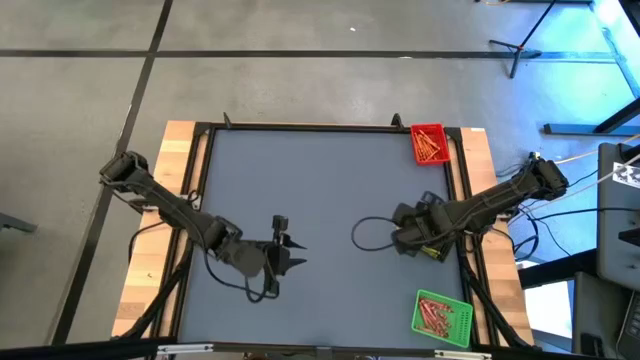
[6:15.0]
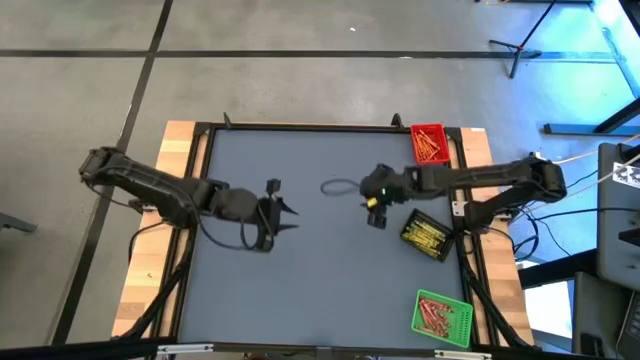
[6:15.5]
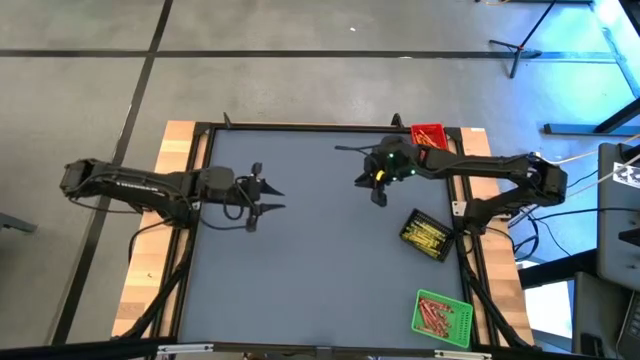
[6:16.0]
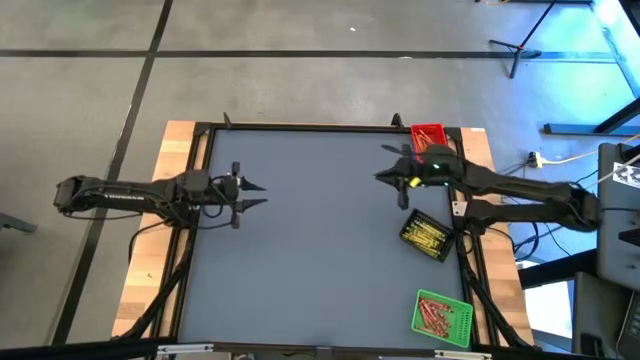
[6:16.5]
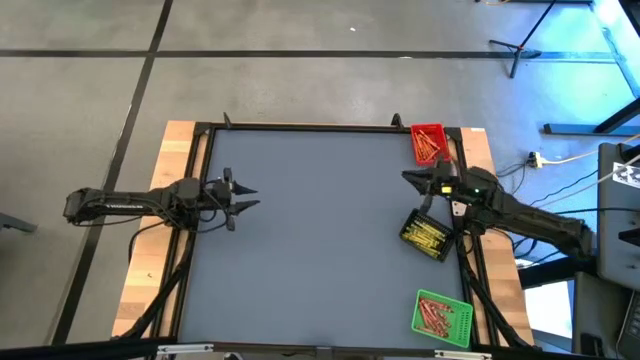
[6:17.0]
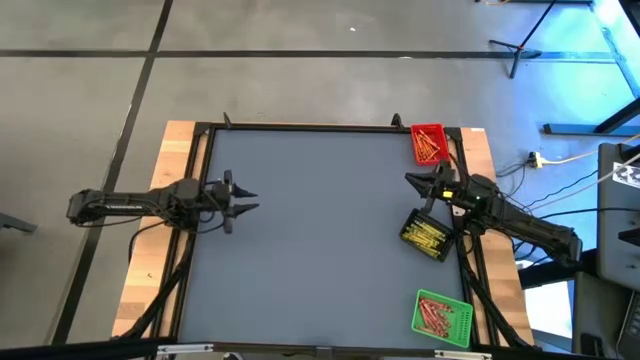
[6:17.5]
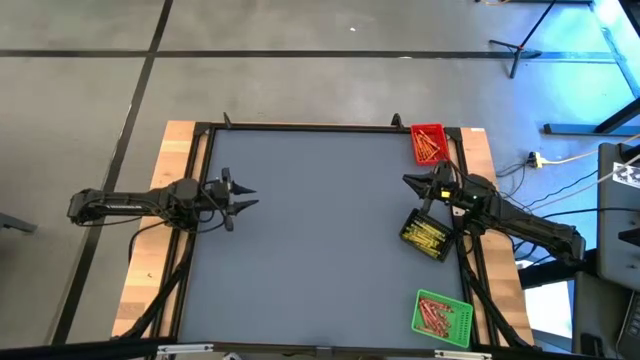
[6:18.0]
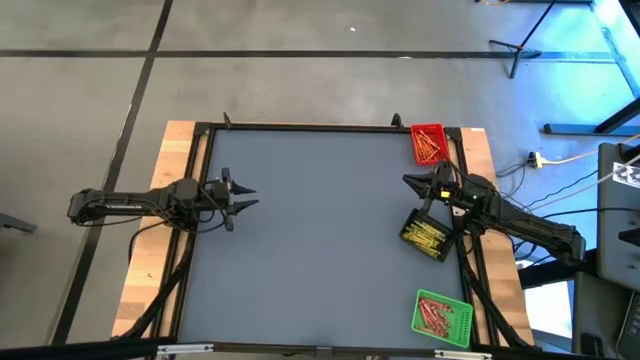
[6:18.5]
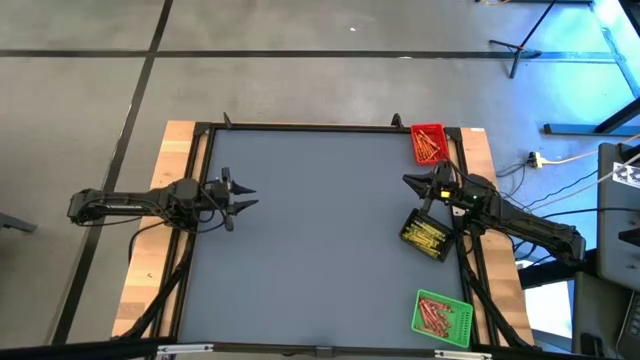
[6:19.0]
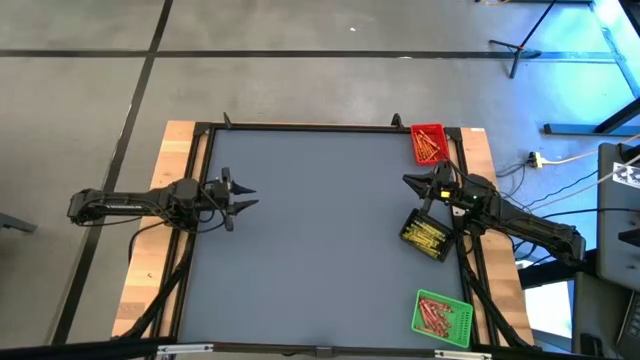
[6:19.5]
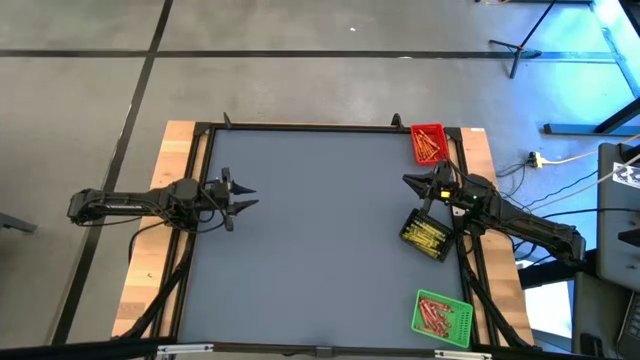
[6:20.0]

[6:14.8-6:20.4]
Task: Sort crayons
Return to Home Position

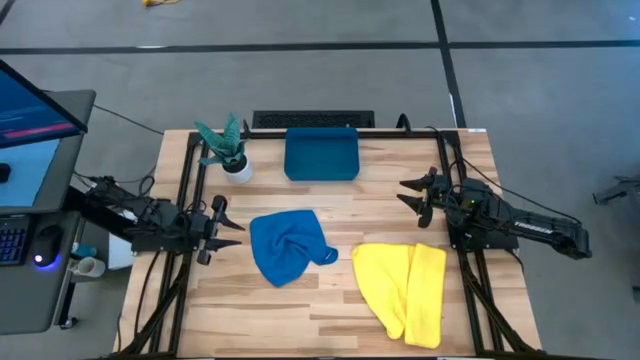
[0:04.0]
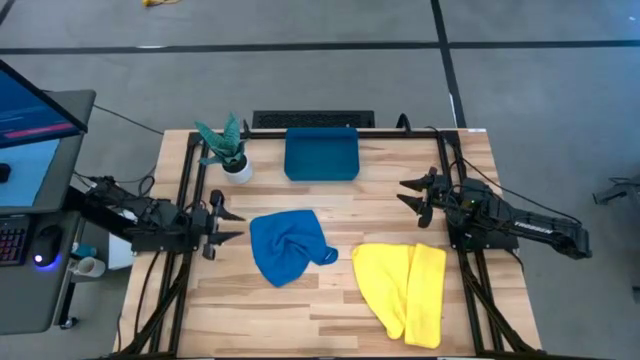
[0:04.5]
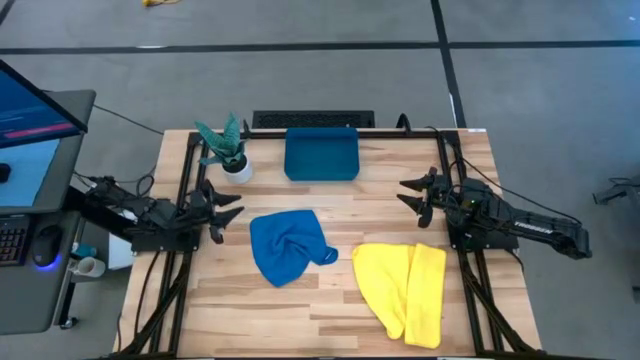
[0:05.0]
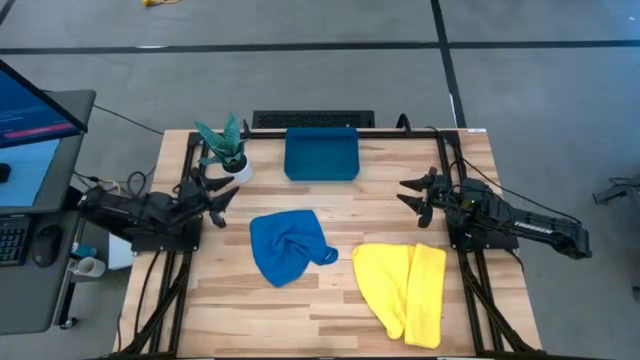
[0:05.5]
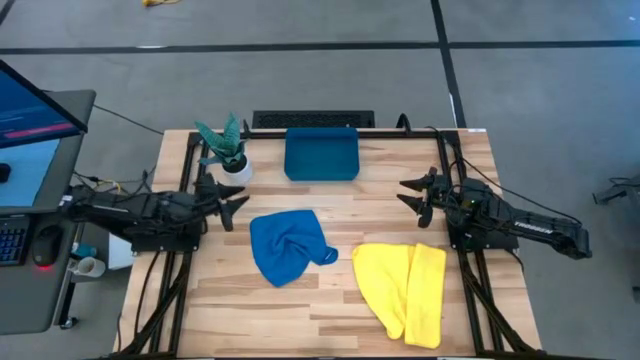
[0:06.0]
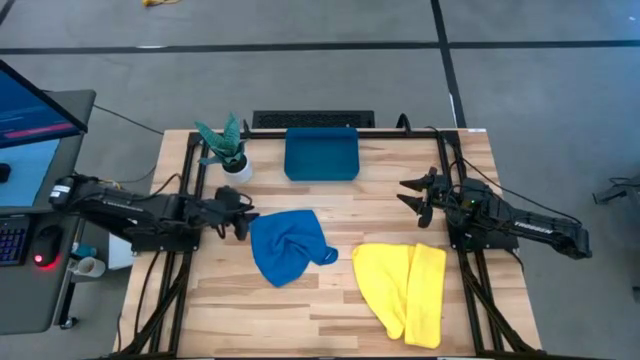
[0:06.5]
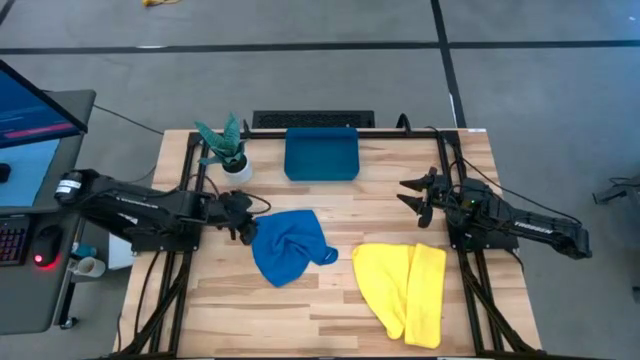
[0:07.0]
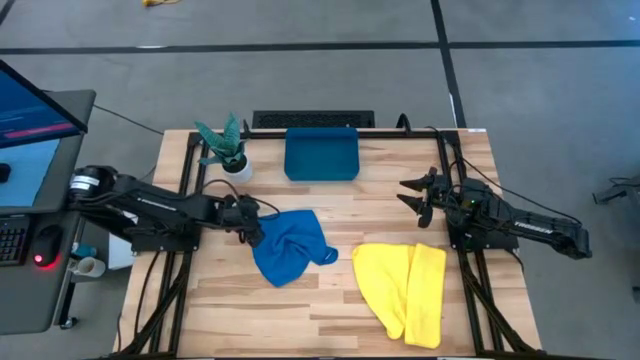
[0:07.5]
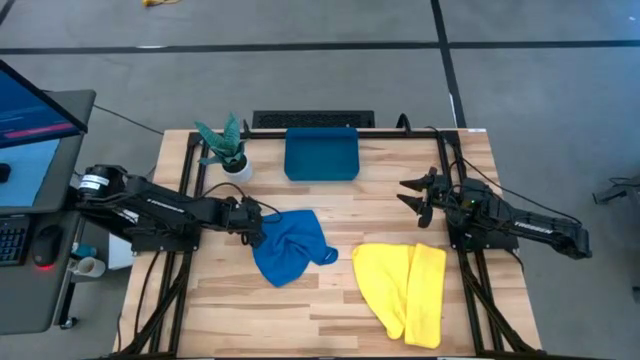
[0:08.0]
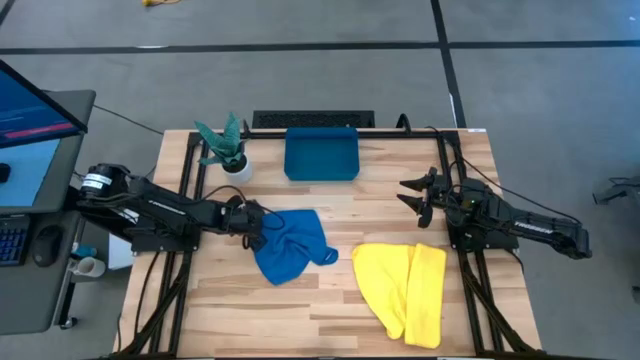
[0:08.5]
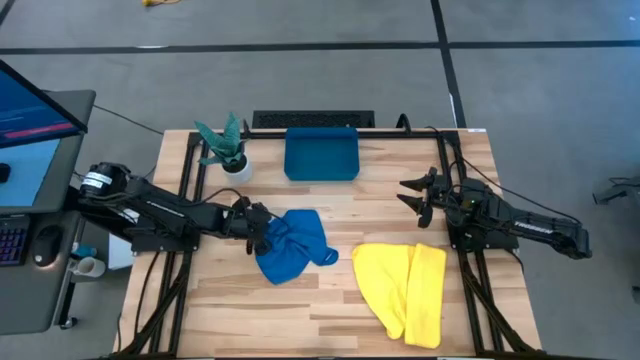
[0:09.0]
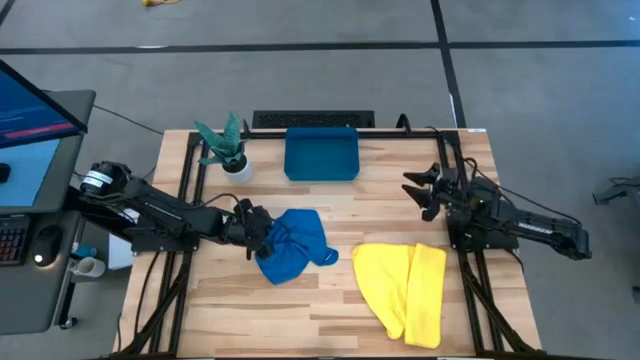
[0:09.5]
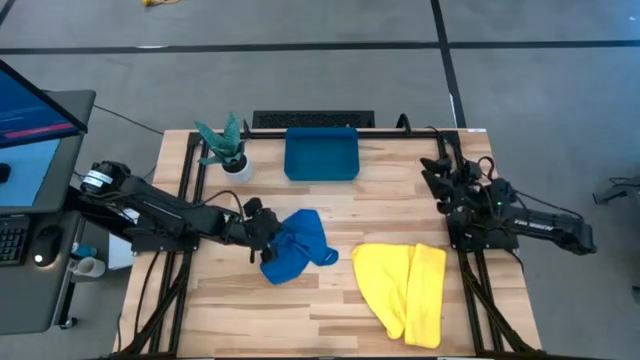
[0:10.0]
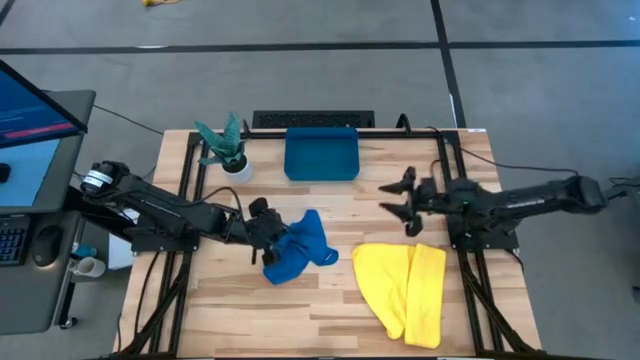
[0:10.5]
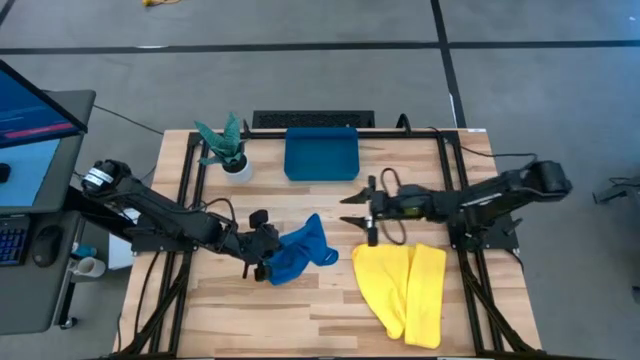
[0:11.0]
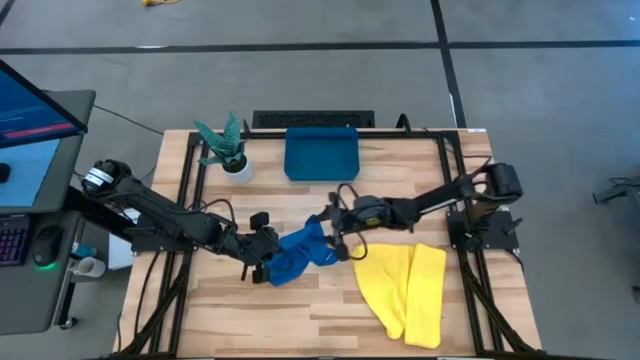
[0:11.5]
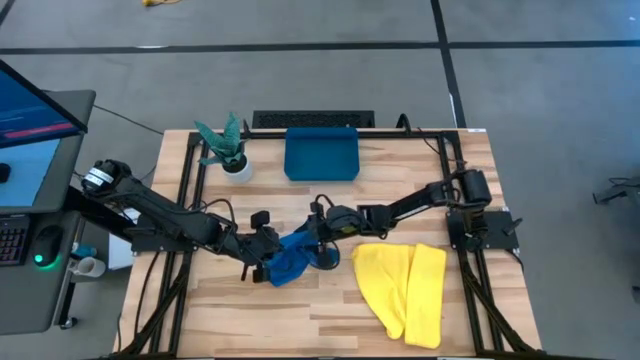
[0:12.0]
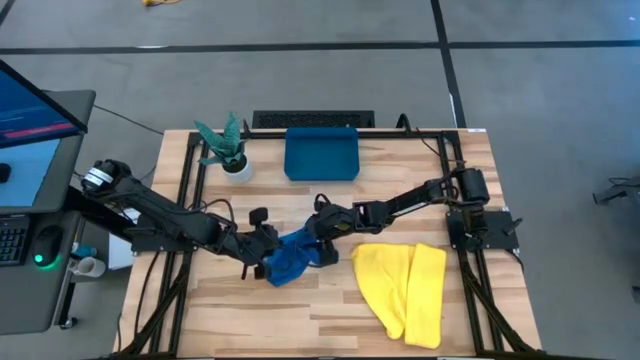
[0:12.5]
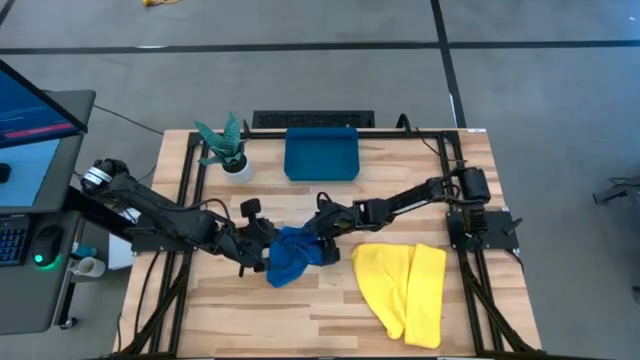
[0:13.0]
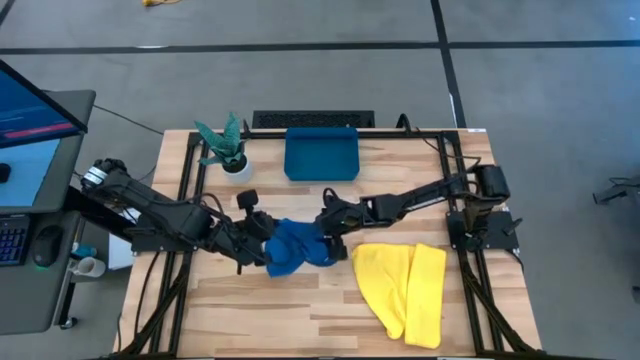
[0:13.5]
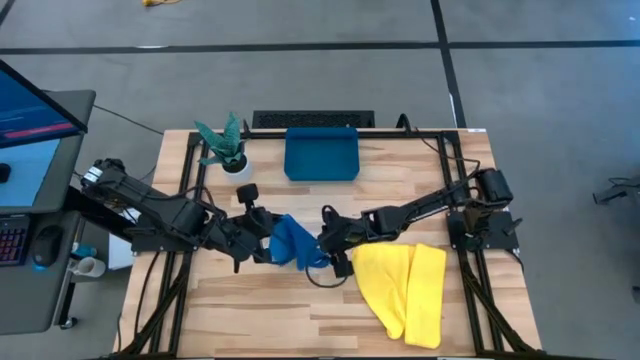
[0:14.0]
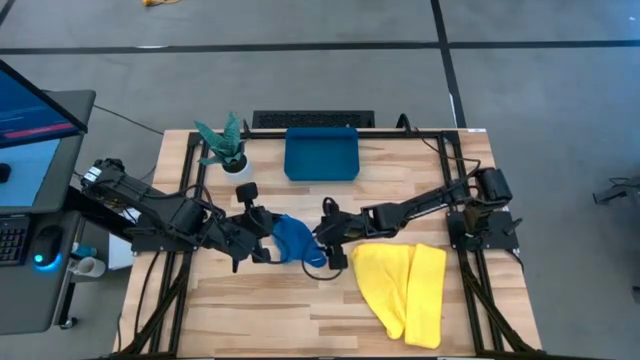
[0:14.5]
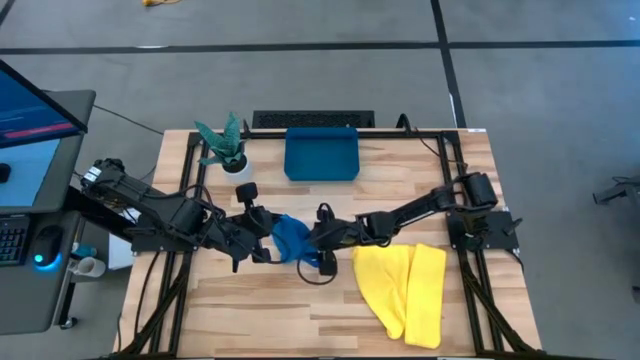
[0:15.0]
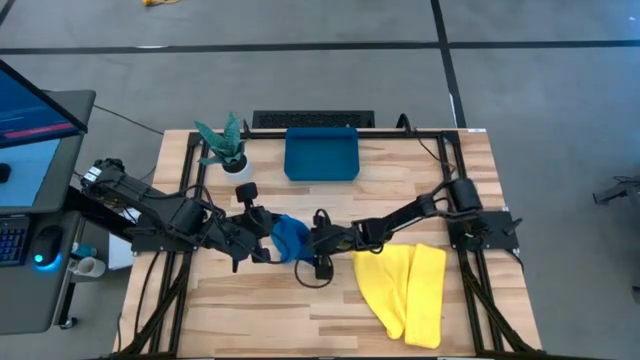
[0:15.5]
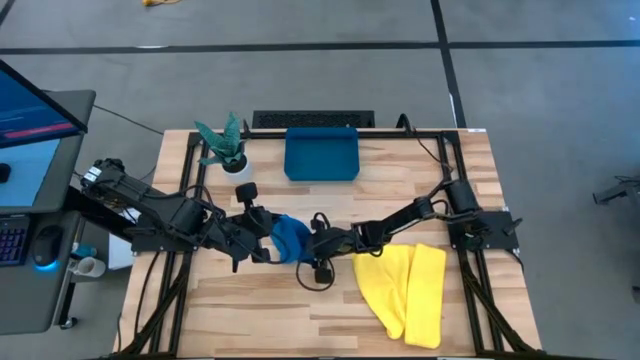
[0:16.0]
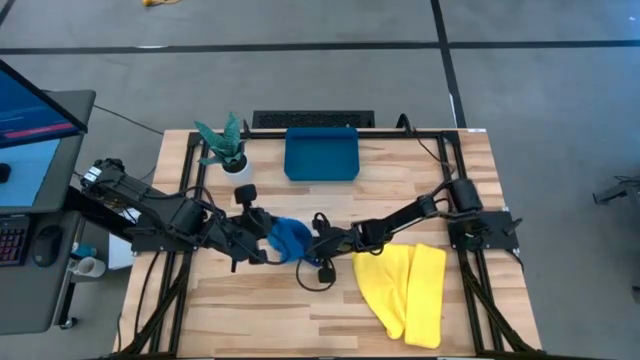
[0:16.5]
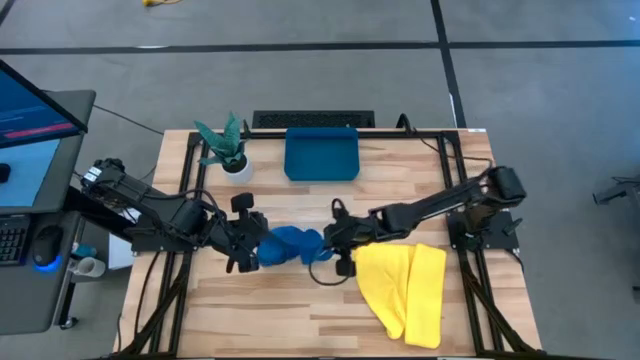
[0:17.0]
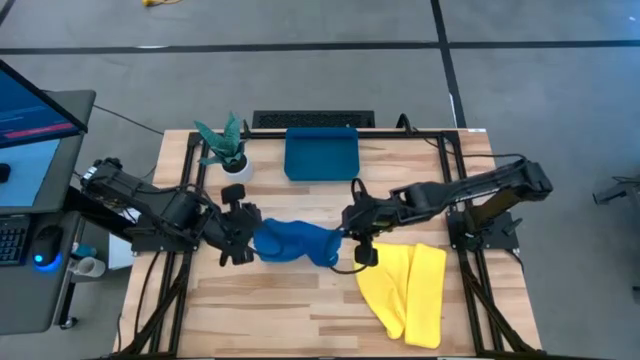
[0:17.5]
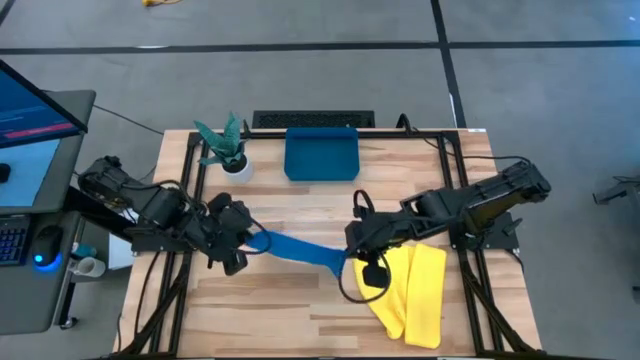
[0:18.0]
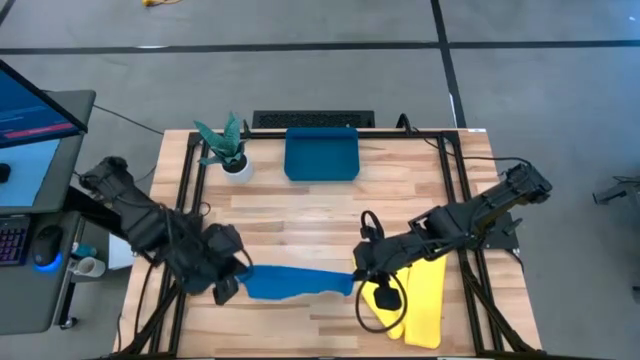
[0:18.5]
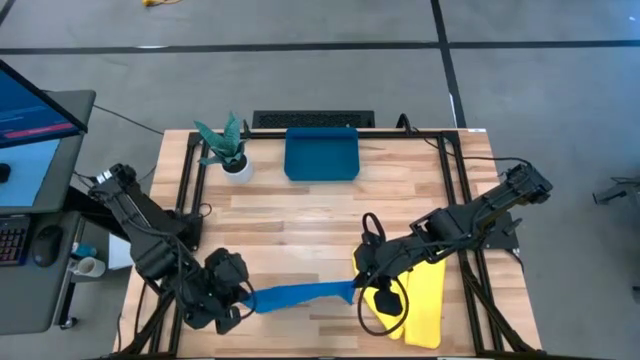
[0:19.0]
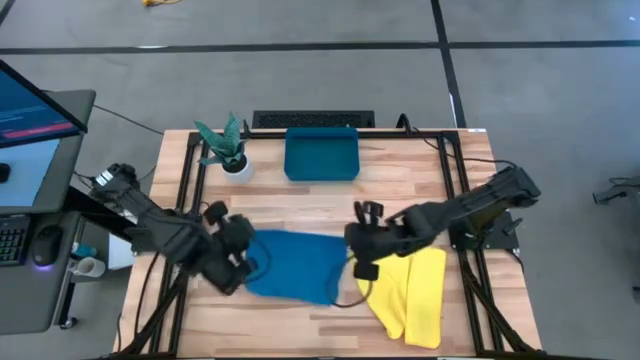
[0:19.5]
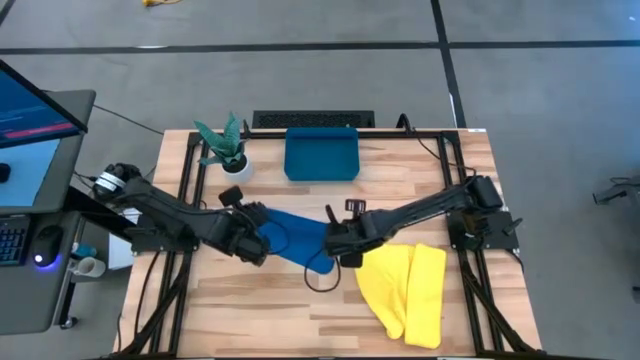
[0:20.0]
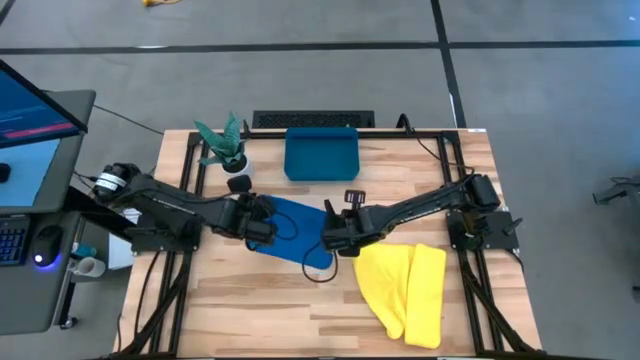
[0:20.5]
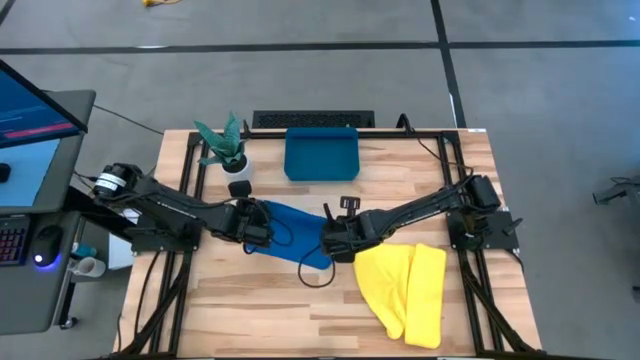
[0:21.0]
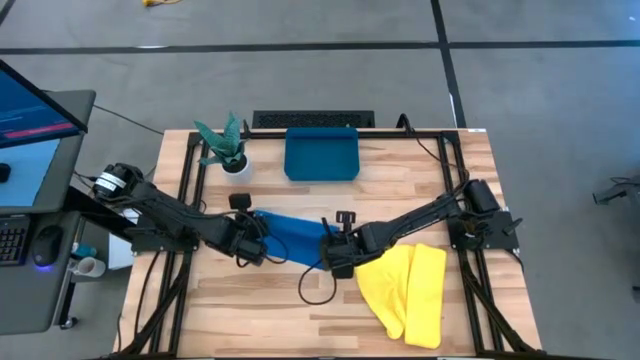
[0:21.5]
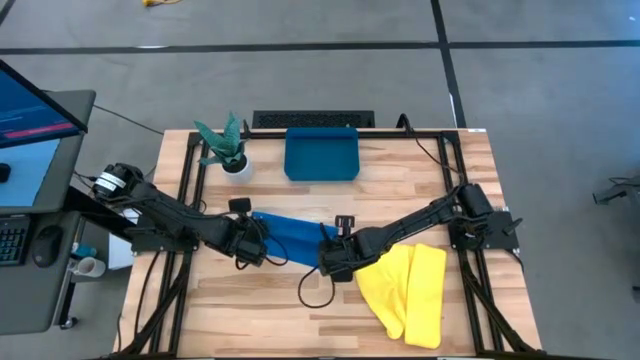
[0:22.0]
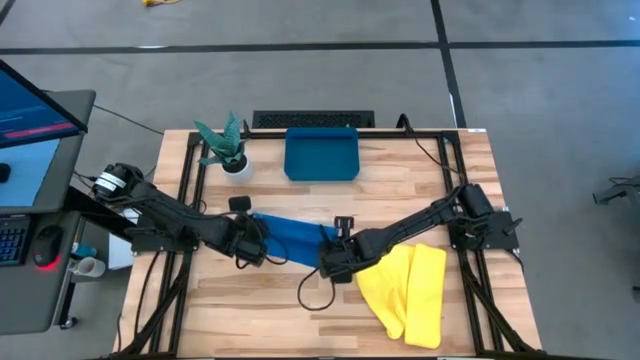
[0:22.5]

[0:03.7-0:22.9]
Task: Roll microfiber towels into tight, uniform cylinder then place into a basket
Fold the blue microfiber towel
